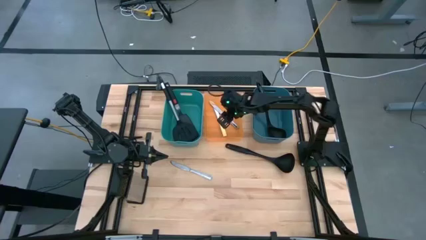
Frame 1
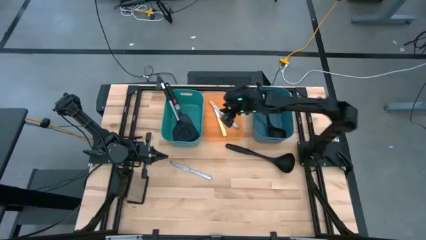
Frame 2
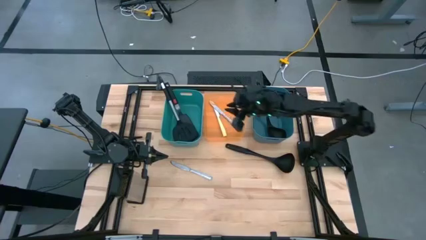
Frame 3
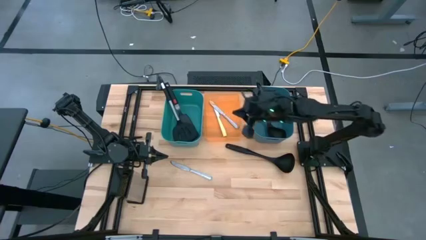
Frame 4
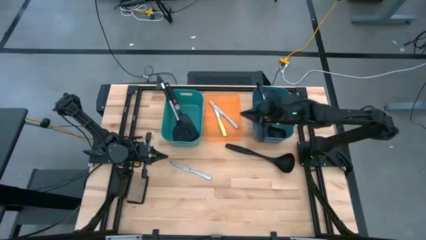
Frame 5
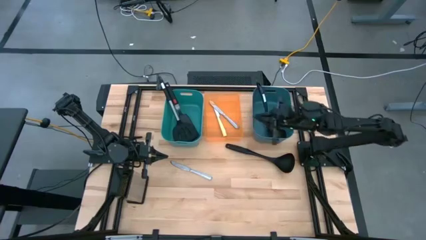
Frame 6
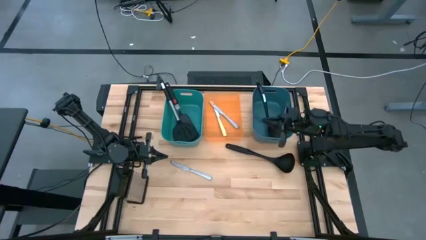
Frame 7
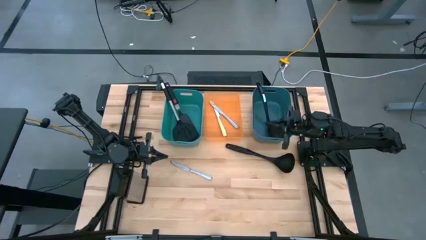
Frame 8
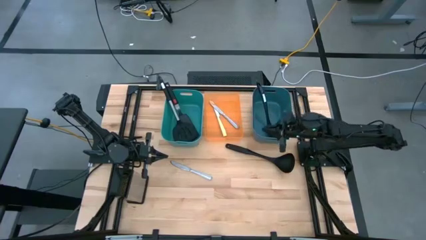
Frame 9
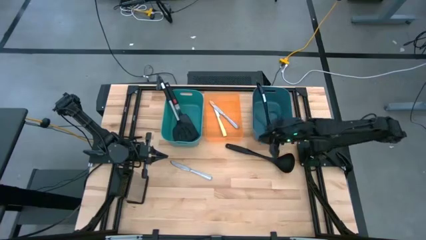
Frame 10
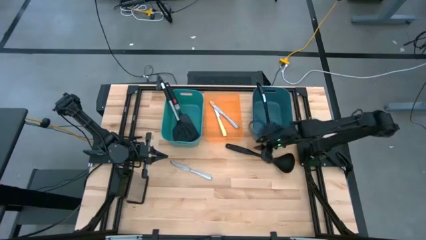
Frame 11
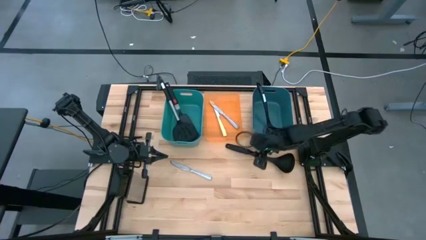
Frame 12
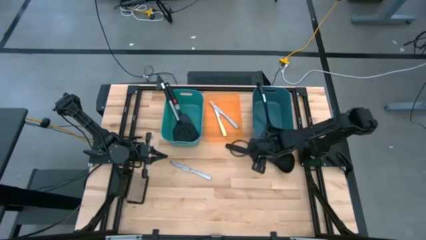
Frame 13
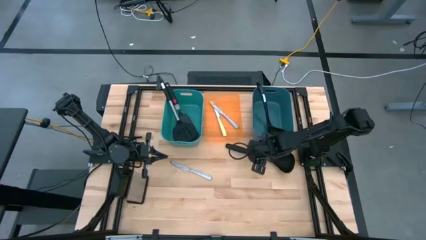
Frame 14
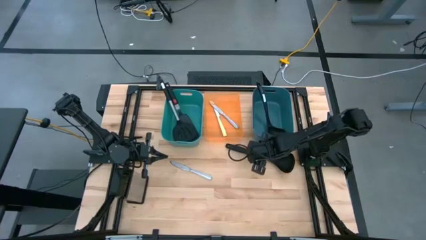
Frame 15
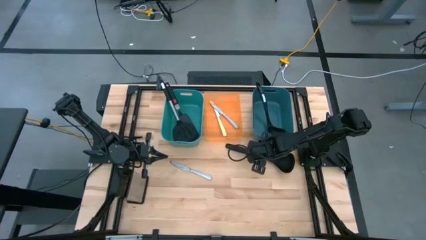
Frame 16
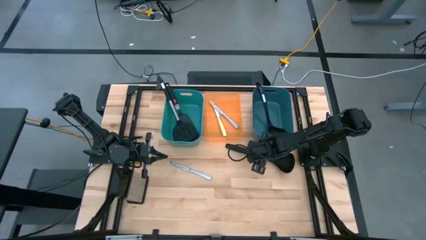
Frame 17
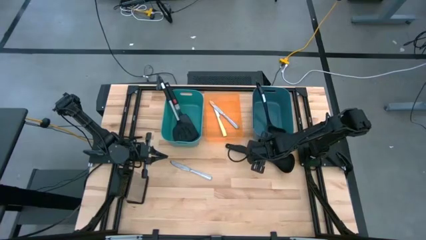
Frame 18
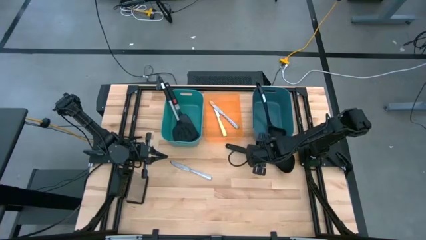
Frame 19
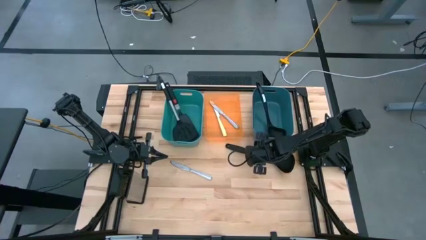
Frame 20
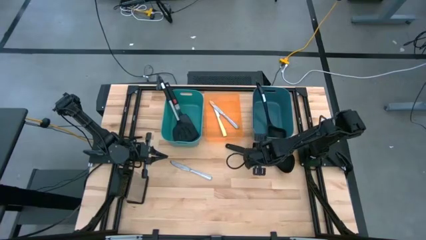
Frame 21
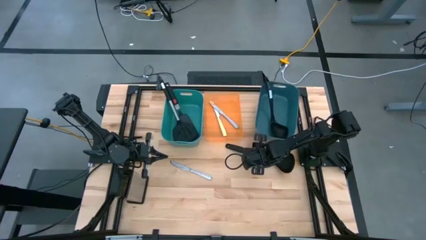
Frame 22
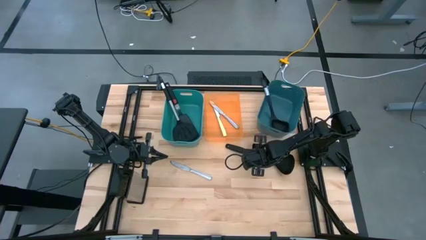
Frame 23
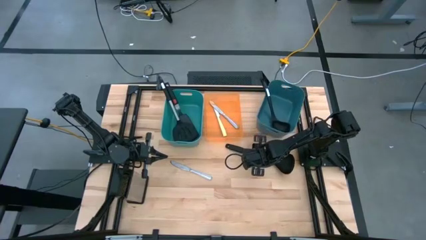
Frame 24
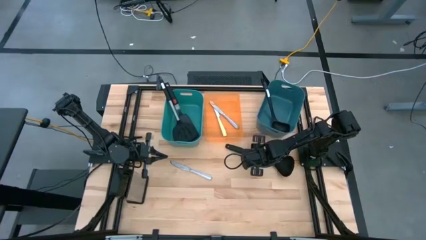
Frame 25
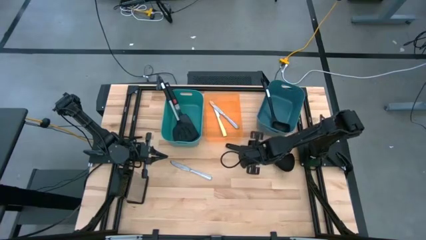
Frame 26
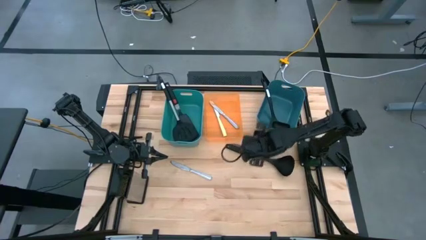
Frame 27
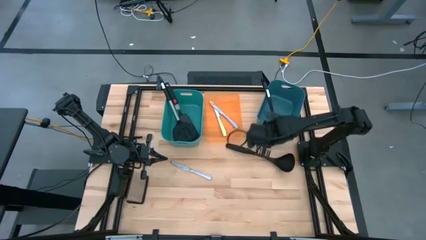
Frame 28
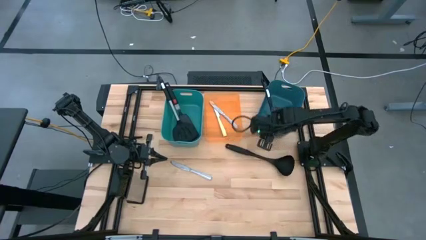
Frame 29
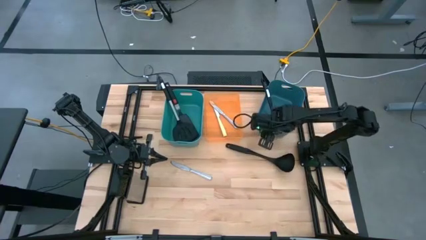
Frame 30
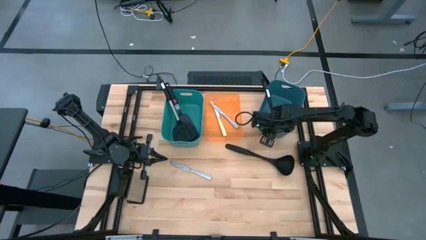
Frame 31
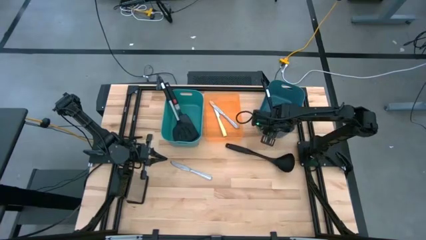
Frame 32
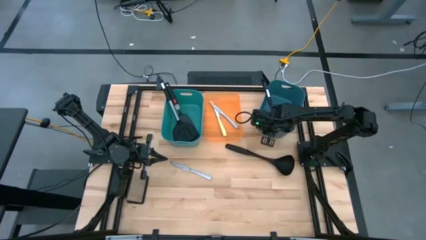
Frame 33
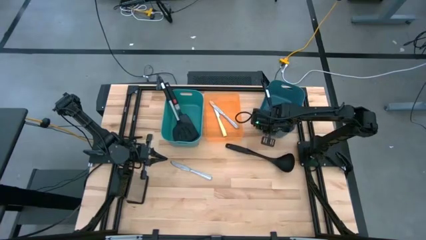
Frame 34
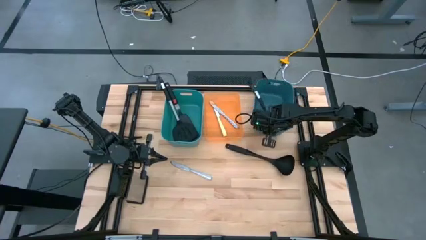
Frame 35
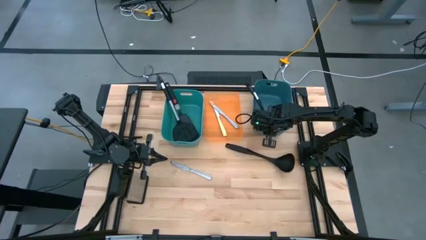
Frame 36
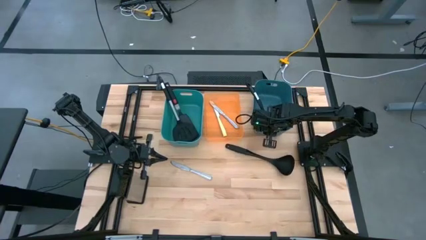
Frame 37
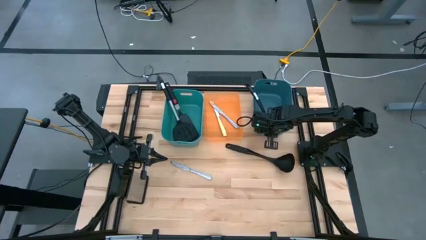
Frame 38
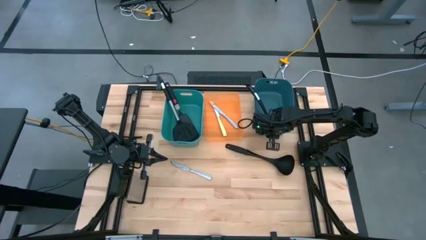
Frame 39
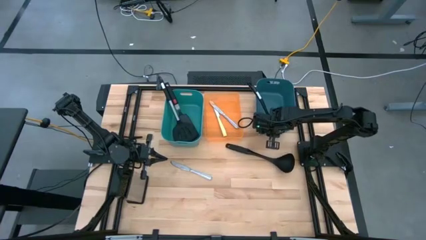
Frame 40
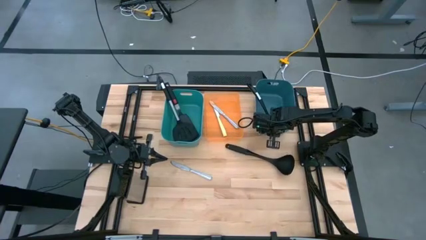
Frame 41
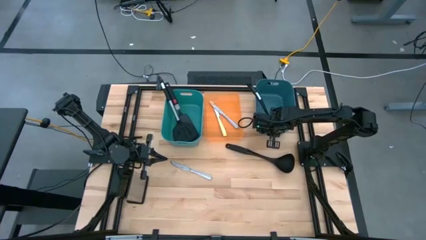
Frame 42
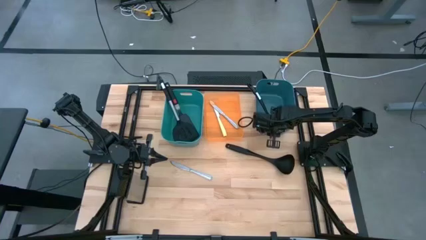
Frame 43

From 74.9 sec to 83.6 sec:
Task: Pick & Place Kitchen Items
Adjust the blue bin

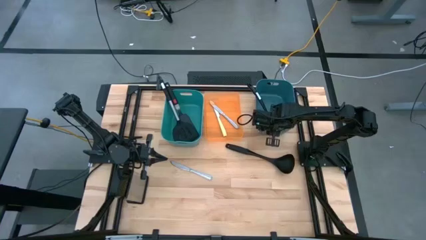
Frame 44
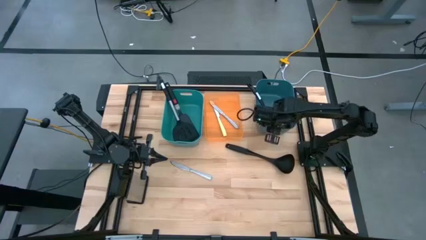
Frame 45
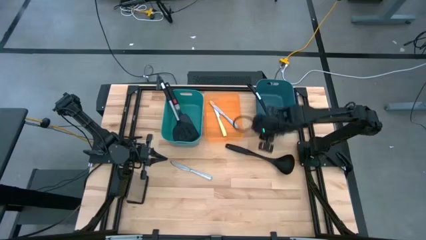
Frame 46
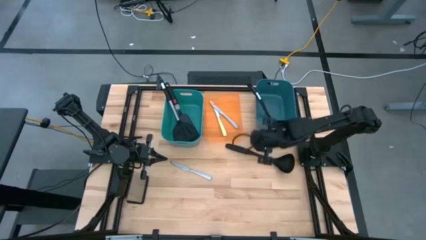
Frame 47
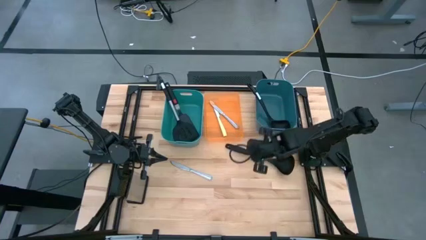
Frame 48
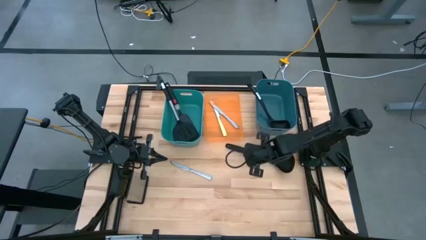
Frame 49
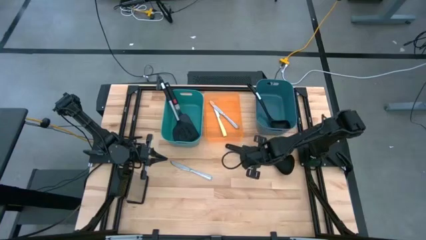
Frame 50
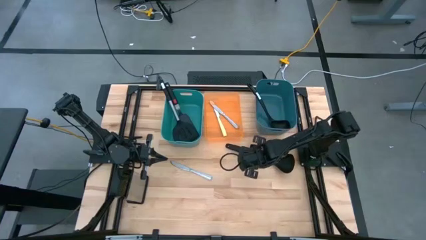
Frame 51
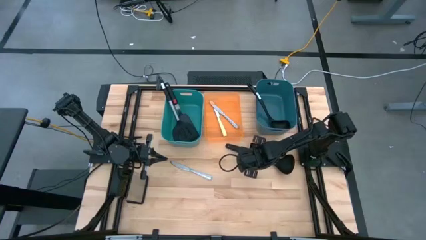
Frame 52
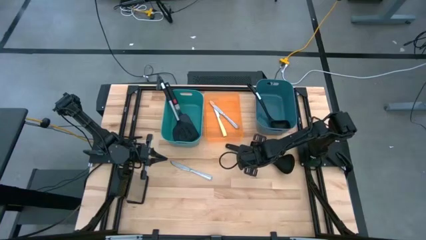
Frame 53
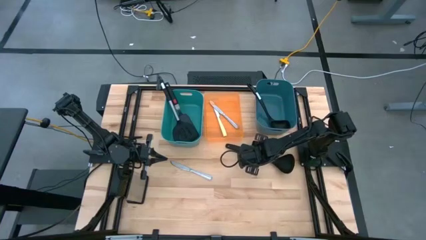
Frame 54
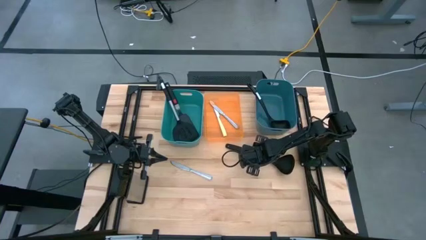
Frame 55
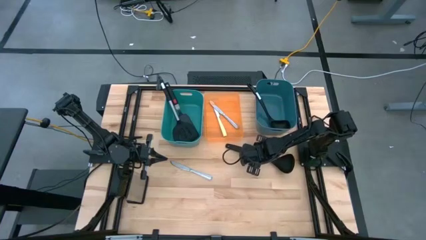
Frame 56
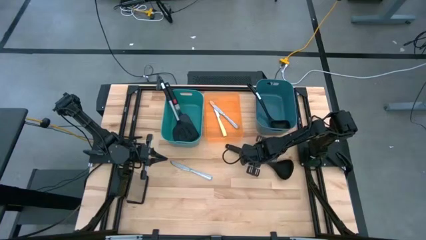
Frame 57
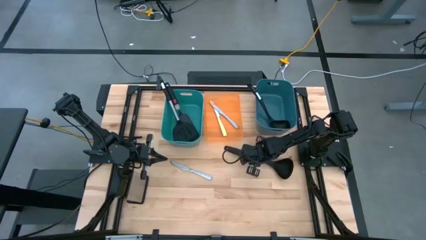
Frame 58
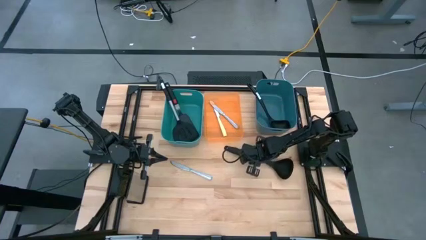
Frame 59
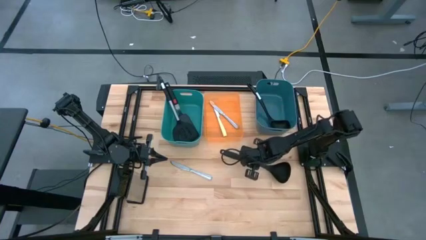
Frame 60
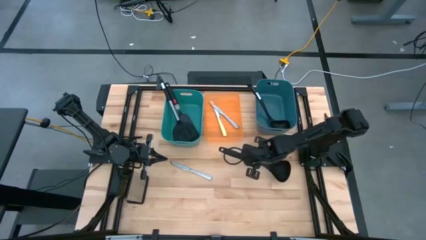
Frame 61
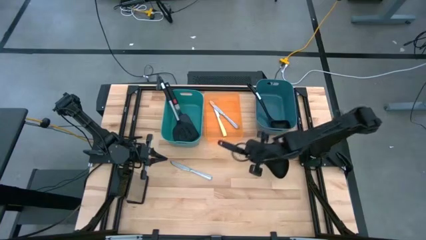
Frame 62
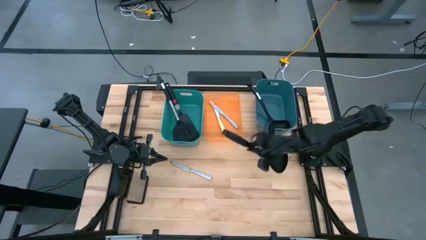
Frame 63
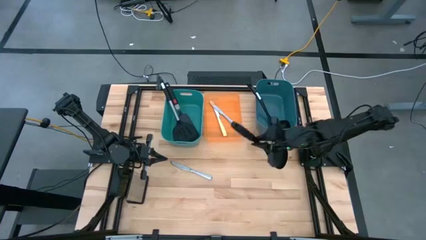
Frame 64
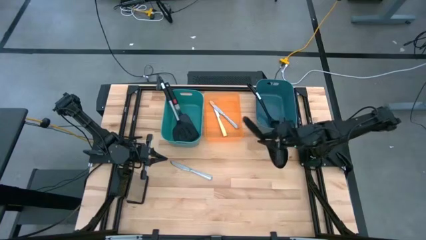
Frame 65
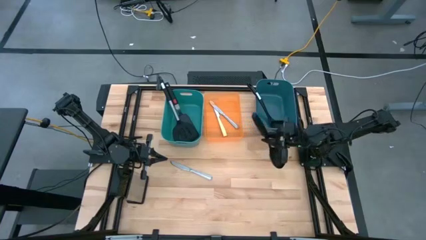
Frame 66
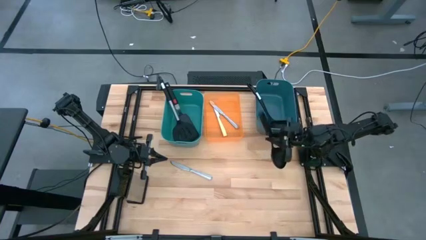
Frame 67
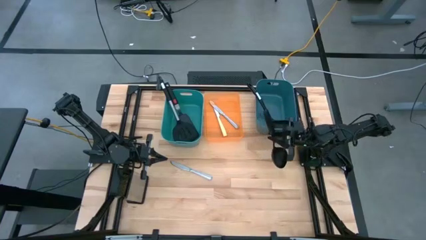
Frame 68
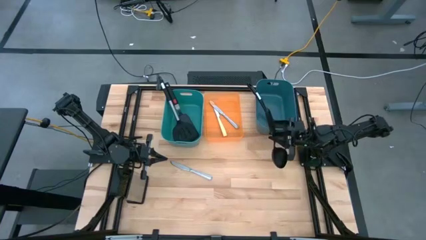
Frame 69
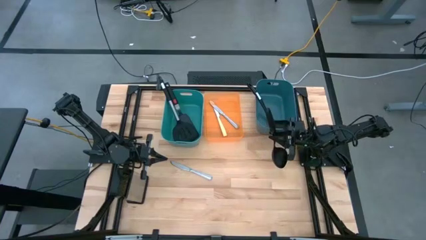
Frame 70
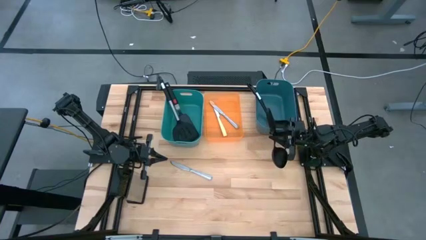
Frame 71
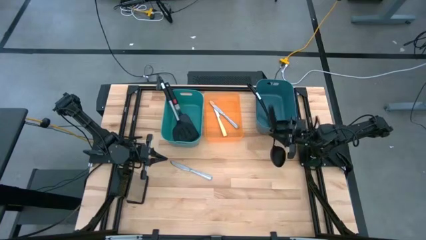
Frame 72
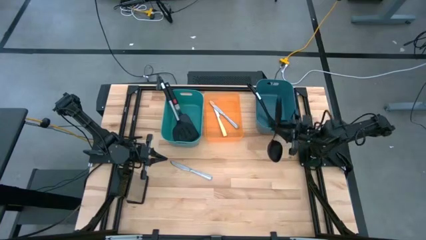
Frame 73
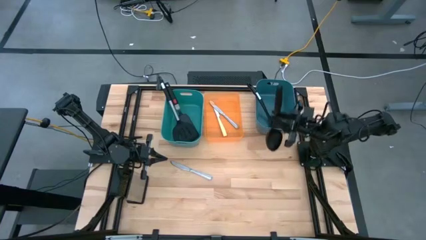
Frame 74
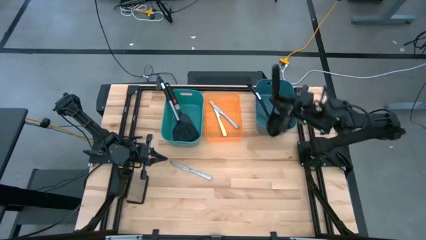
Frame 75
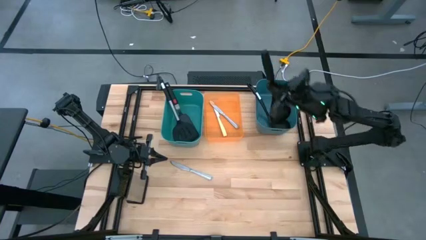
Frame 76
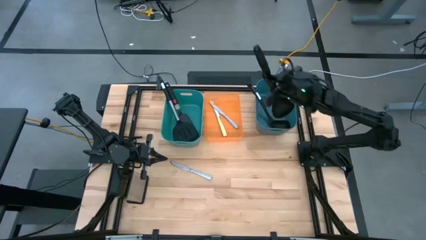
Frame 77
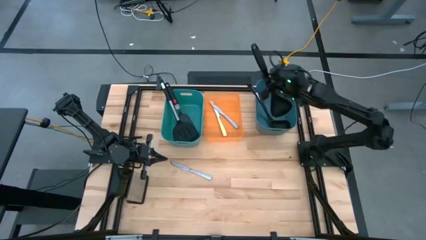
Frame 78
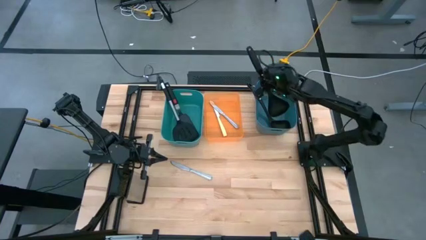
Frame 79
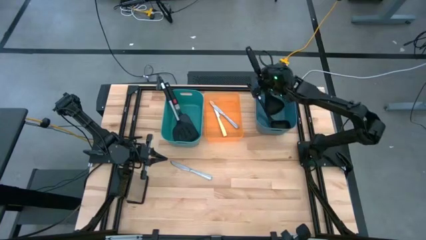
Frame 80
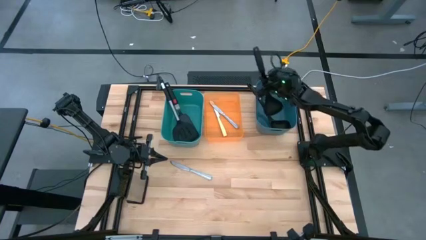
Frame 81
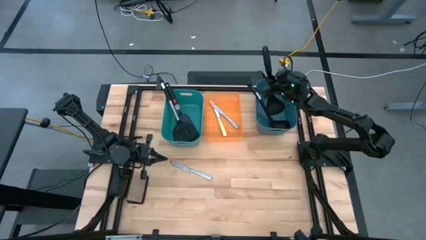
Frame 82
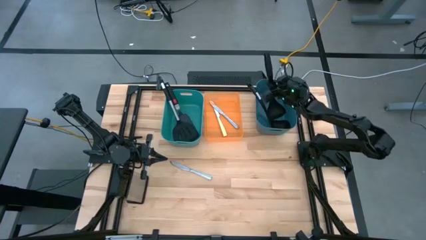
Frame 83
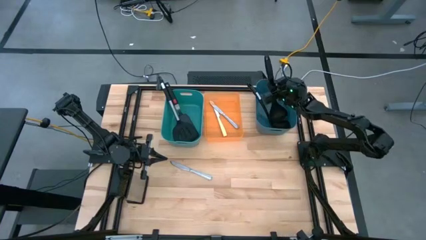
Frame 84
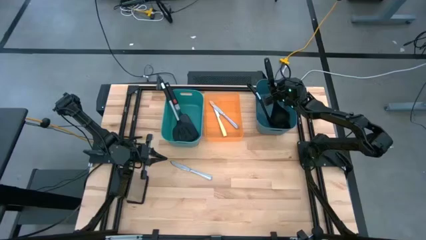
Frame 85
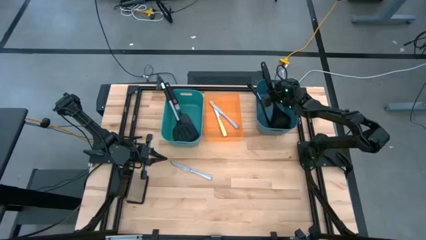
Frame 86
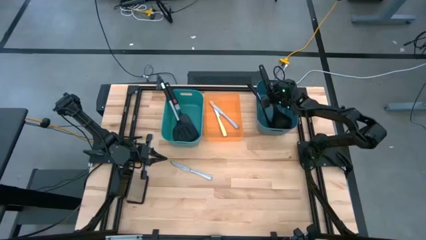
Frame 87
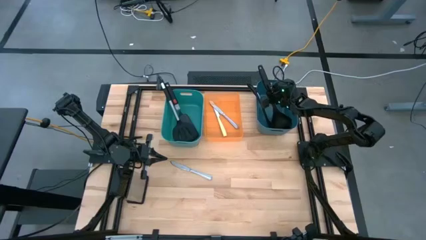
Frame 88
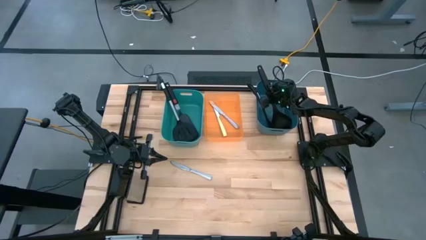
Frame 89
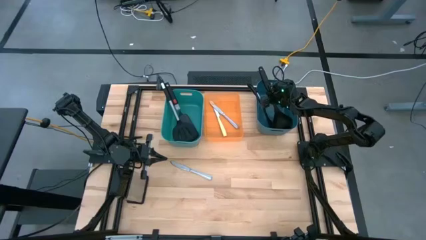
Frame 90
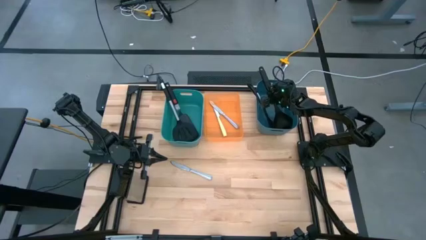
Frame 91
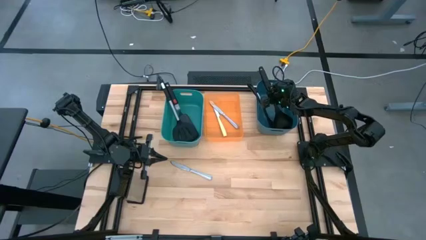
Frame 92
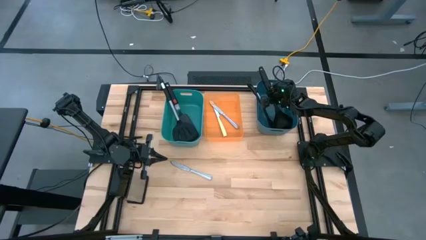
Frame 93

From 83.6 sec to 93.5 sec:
Put the black serving spoon into the blue bin
